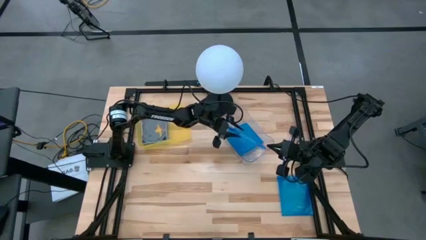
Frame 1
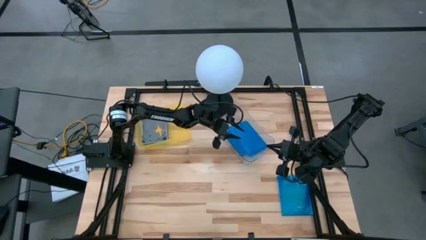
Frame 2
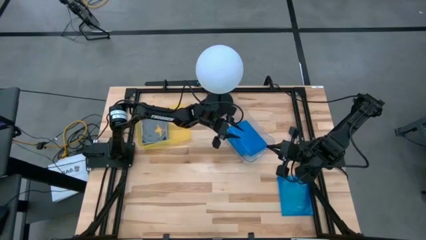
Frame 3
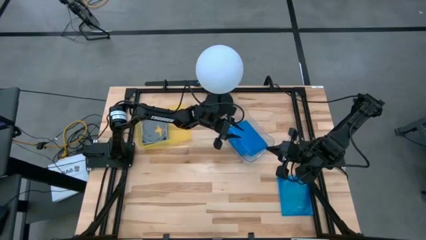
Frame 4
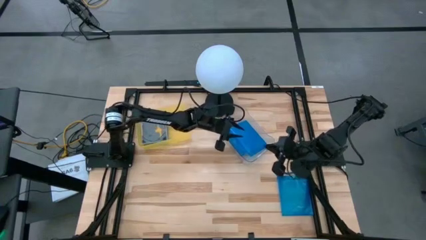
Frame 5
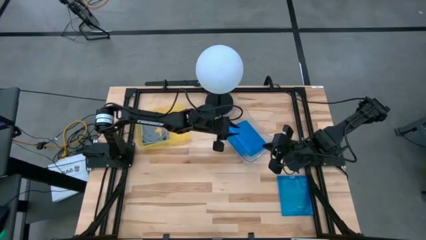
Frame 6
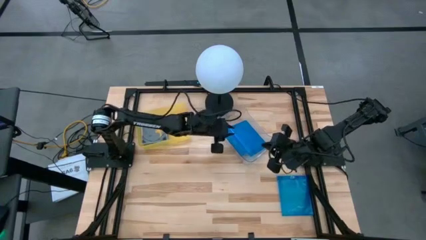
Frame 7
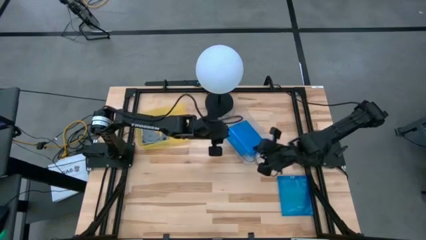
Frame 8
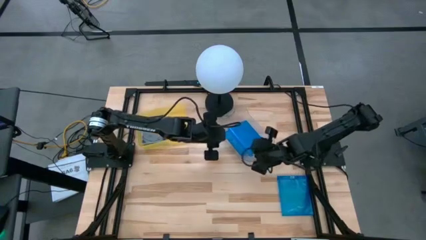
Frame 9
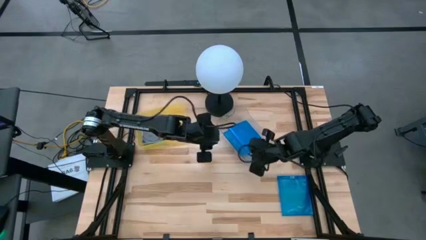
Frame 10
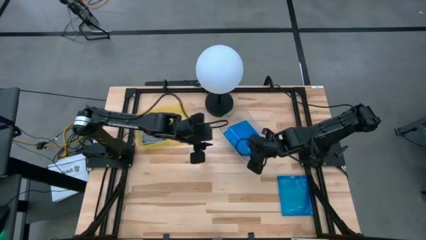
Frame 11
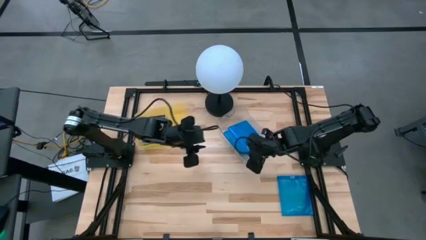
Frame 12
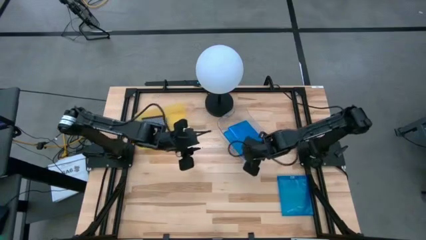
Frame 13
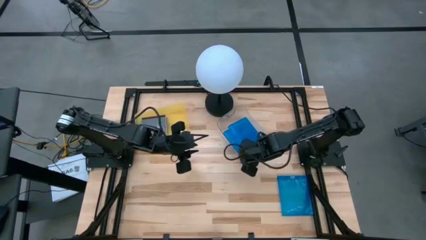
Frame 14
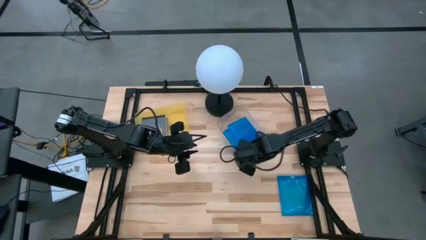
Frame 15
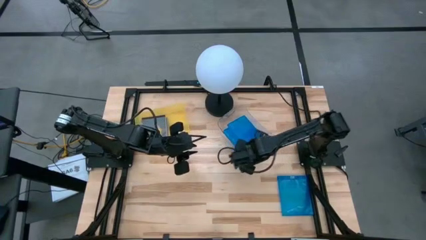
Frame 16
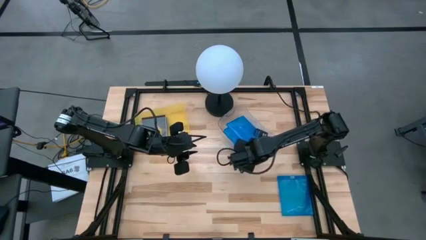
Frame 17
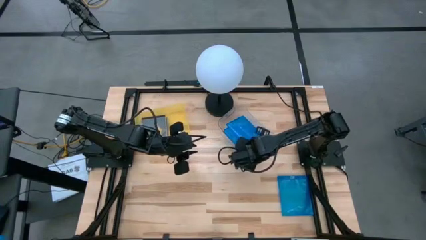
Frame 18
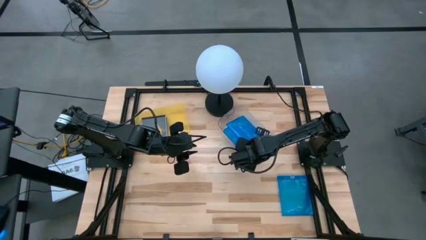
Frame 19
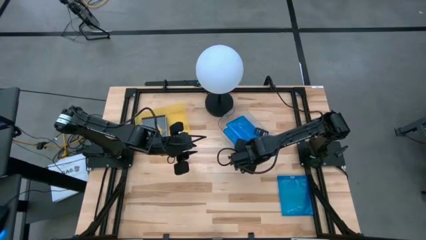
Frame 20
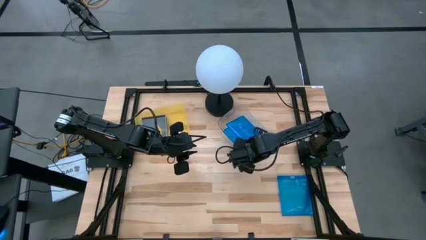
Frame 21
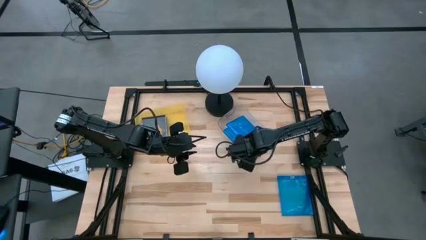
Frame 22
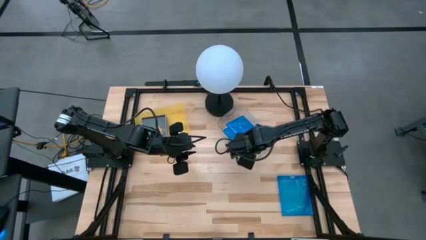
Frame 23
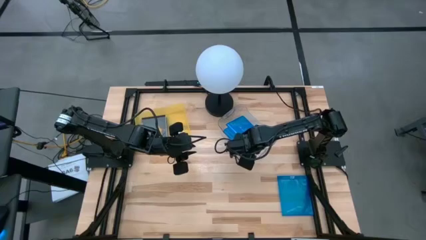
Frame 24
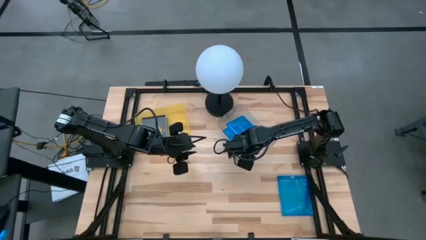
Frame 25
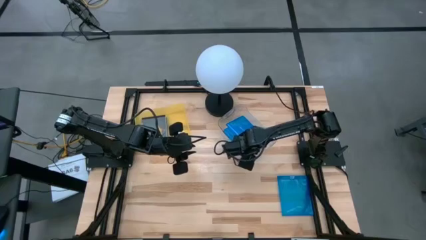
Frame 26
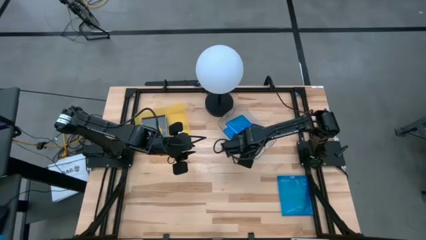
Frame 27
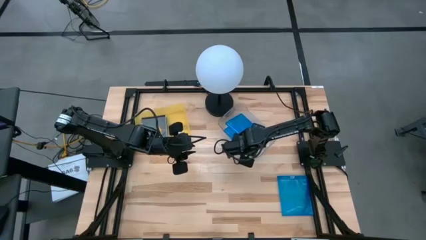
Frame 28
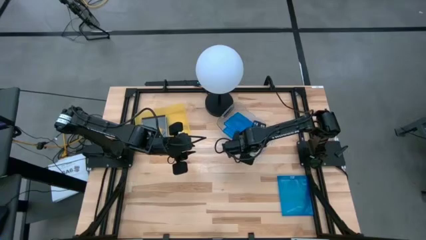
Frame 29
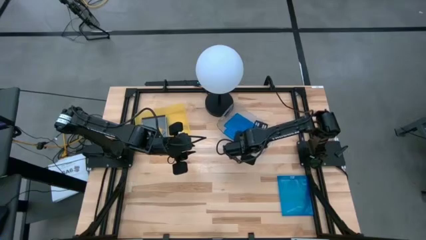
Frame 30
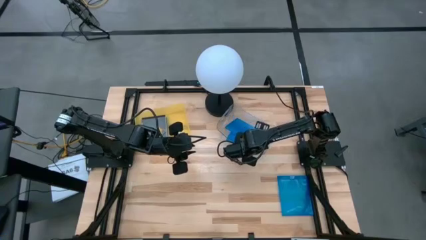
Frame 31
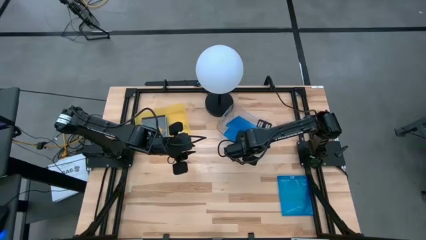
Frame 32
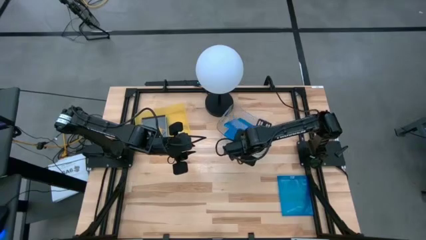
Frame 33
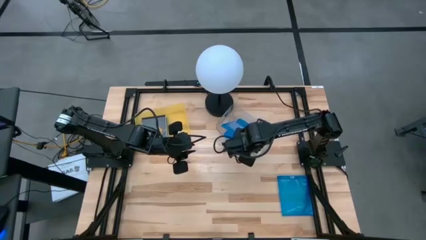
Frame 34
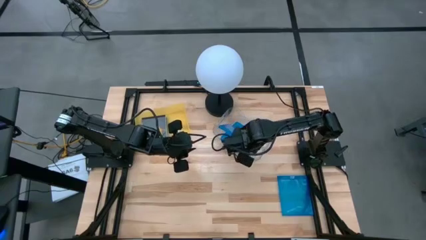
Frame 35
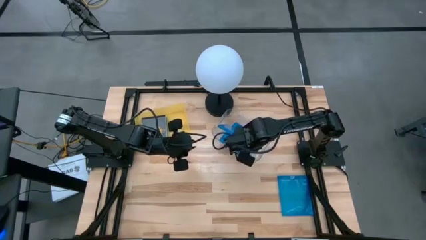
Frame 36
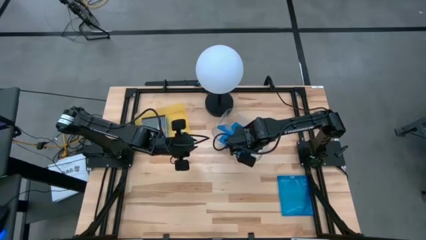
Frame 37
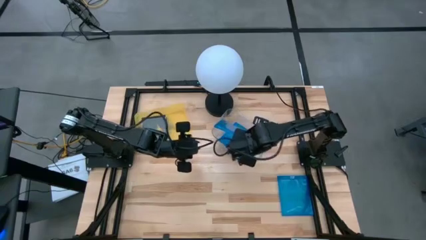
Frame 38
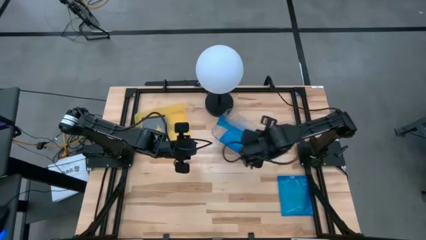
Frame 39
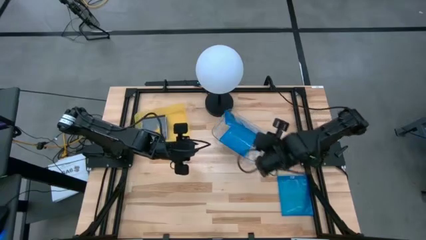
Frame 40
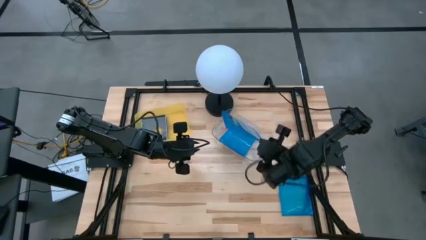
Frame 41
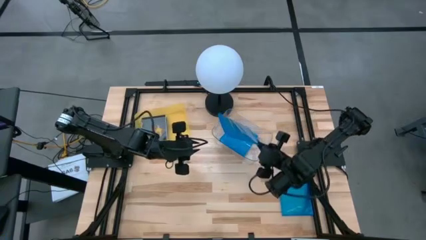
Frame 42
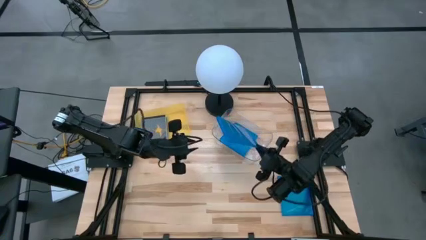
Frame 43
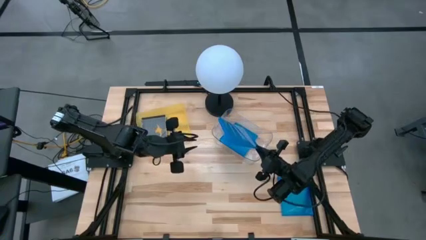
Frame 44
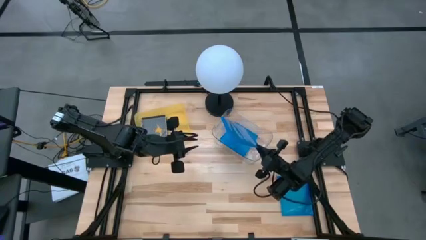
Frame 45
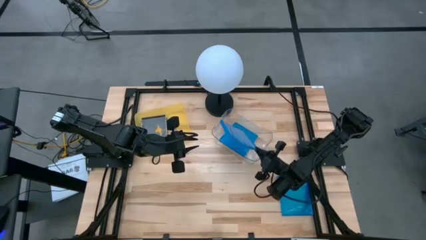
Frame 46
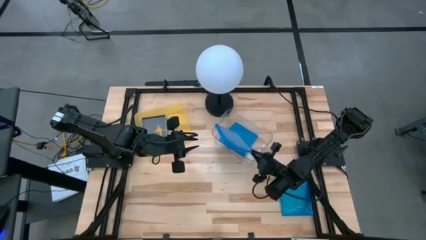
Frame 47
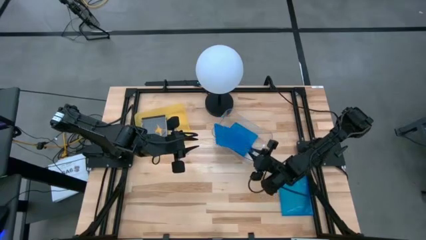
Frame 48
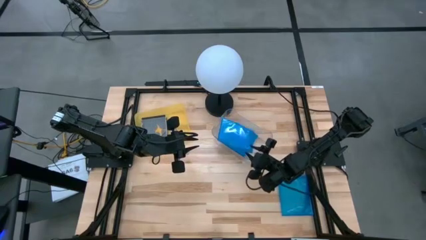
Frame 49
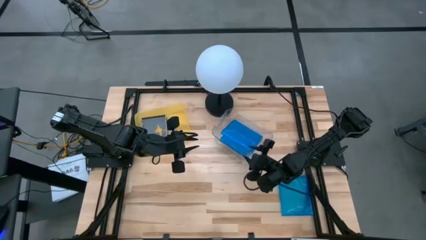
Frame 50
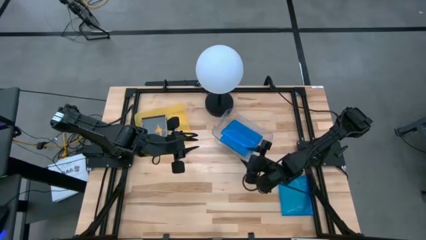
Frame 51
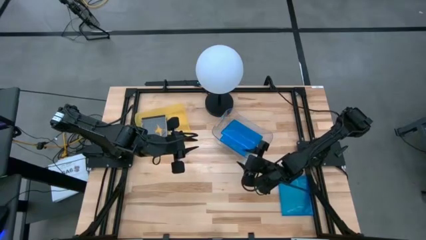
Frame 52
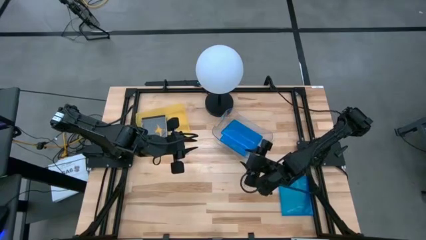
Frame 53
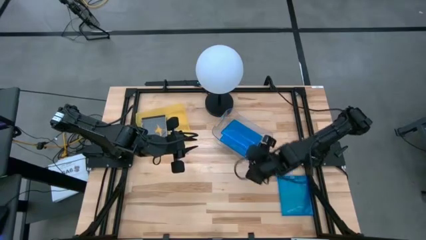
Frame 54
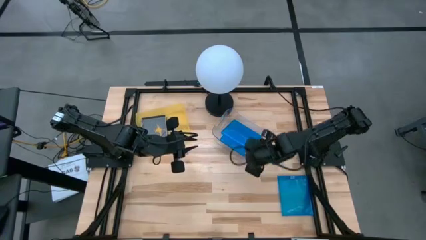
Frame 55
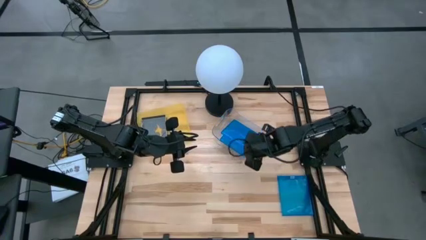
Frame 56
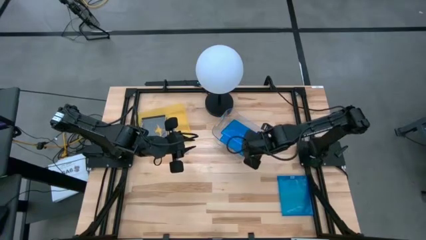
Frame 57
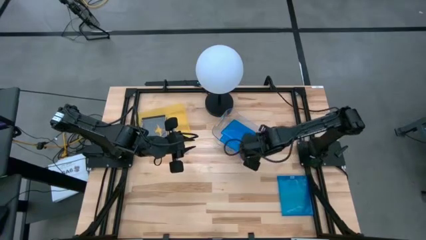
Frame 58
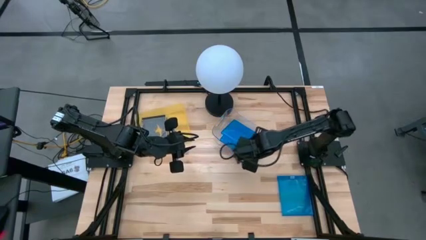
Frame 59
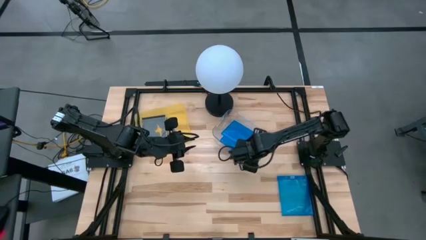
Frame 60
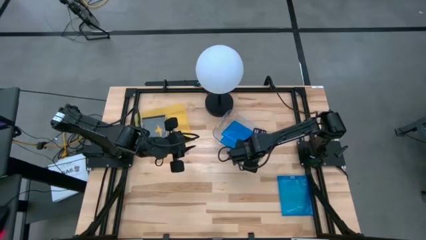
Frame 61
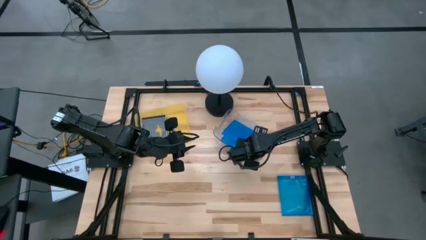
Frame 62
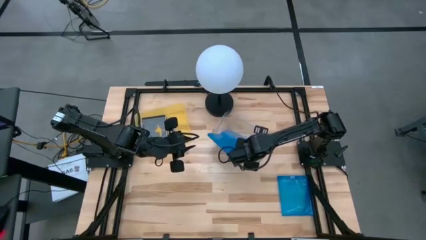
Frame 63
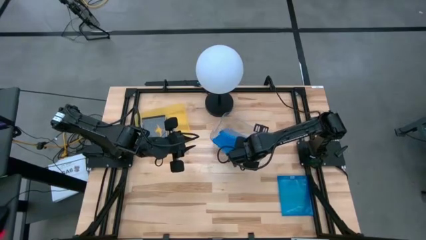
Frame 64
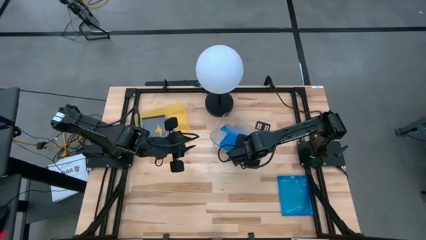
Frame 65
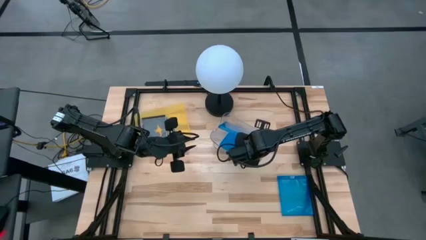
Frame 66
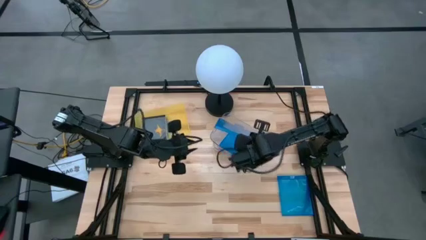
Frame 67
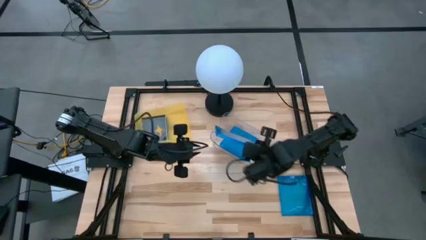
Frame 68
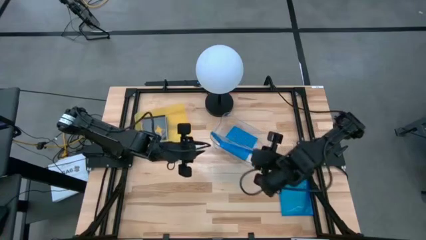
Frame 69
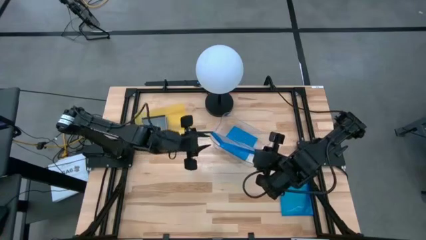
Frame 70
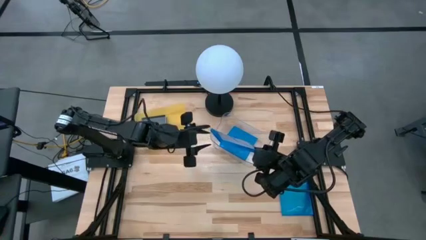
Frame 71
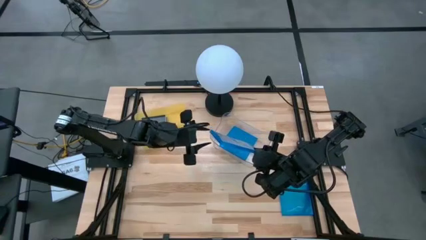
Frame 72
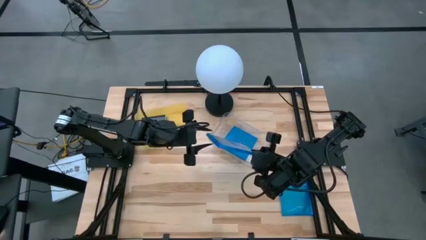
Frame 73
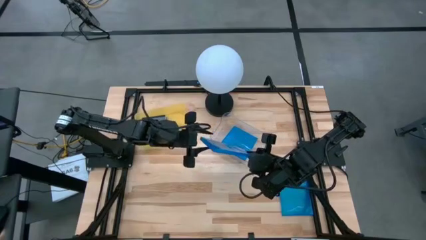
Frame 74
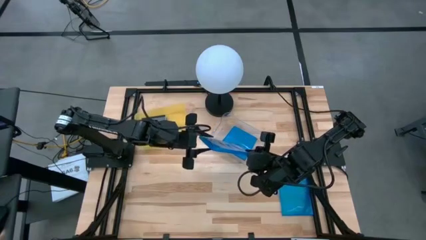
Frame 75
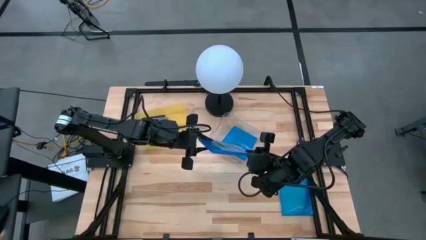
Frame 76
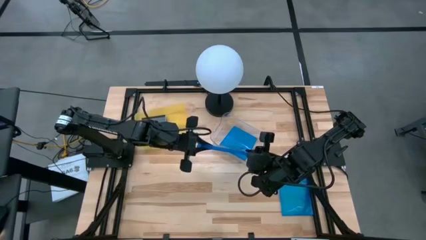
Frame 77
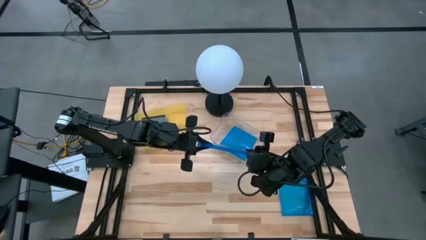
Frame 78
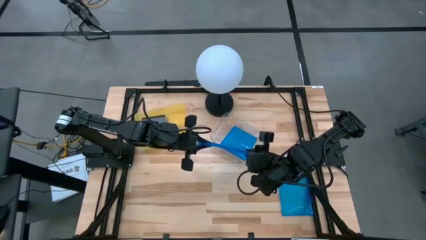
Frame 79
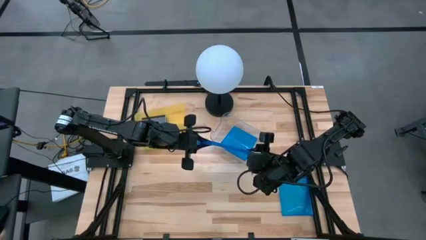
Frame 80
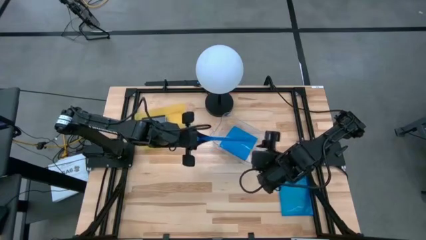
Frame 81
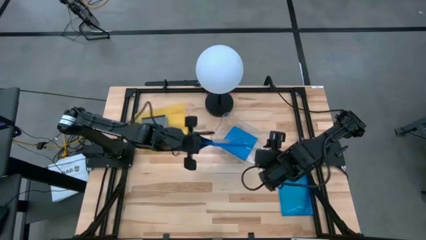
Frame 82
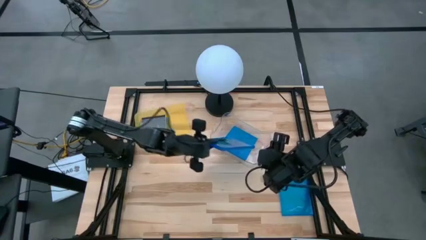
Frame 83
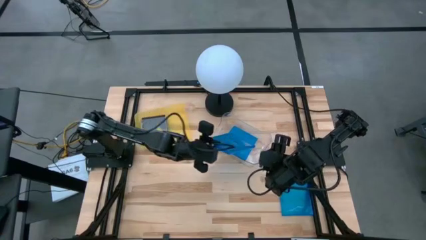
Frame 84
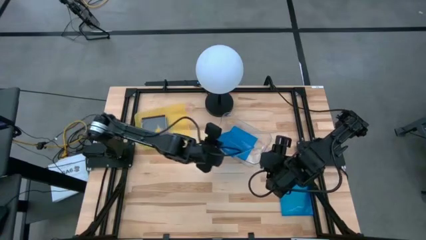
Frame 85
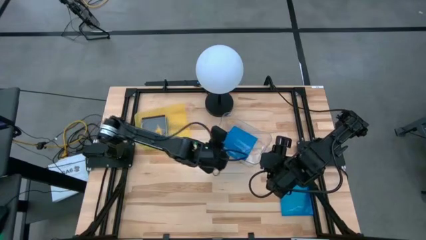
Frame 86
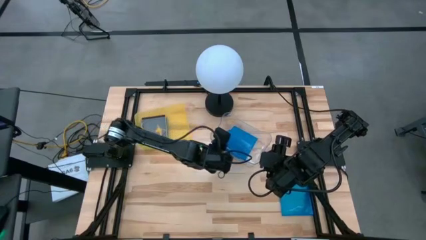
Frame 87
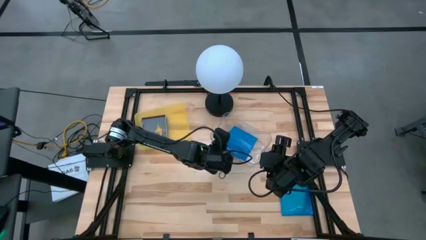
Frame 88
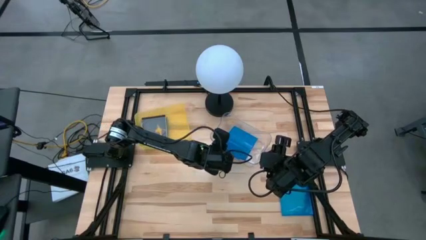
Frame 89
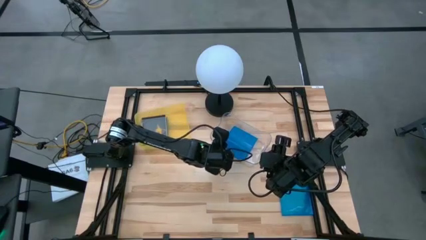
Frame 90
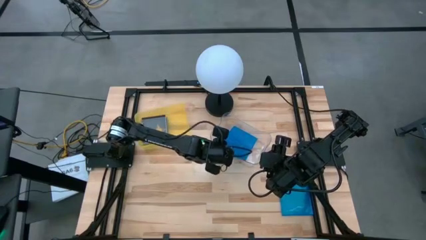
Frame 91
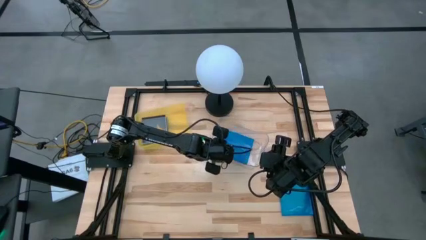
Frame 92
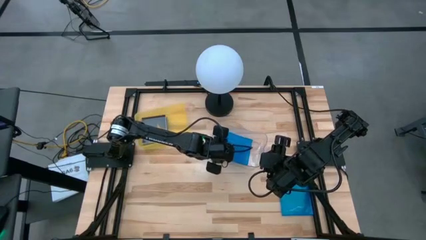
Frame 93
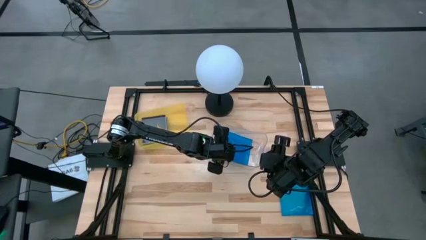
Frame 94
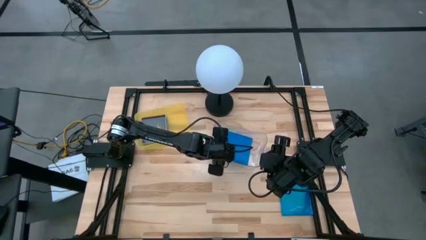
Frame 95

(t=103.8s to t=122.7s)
Task: Pick & place jewel cases by type
Put the left blue CD case into the transparent bin
